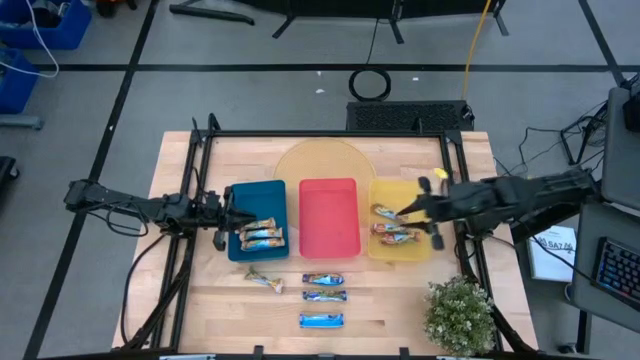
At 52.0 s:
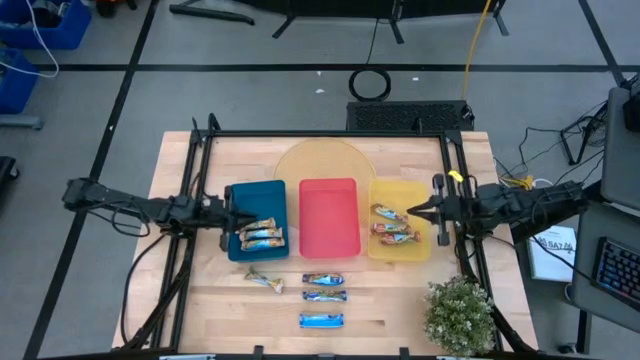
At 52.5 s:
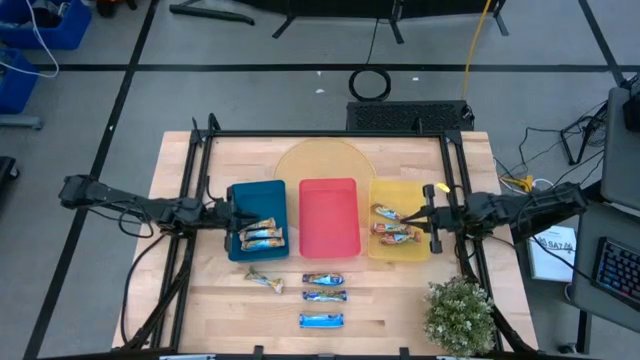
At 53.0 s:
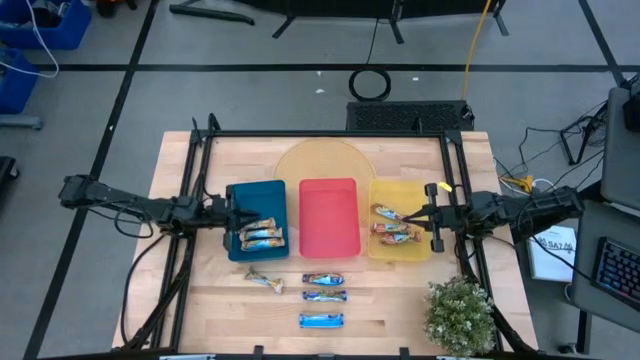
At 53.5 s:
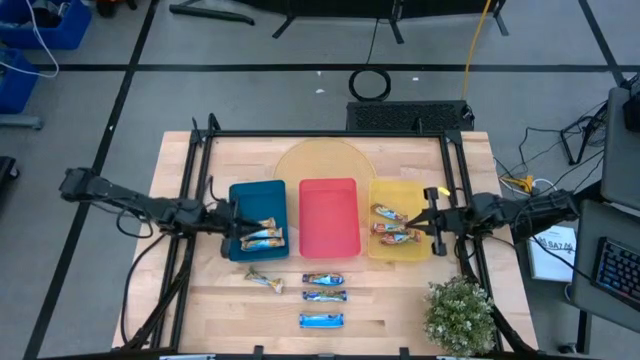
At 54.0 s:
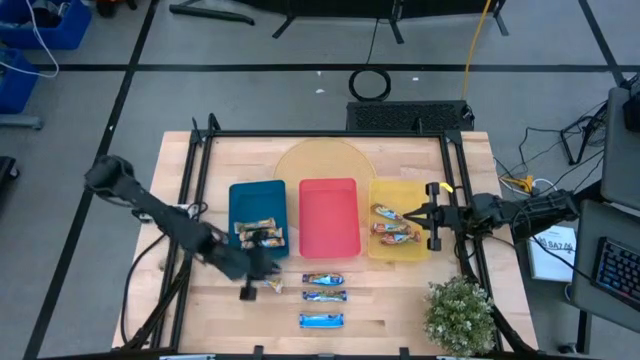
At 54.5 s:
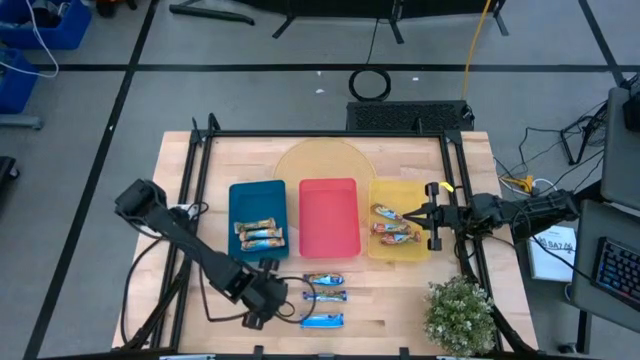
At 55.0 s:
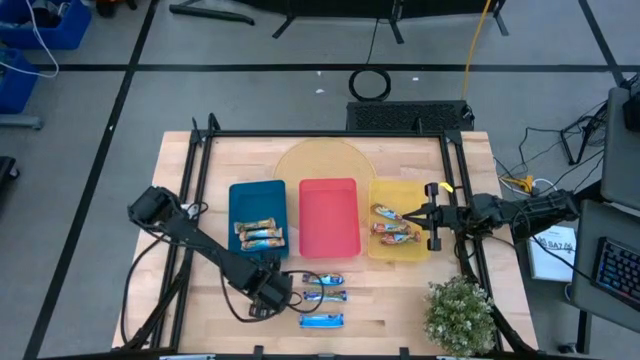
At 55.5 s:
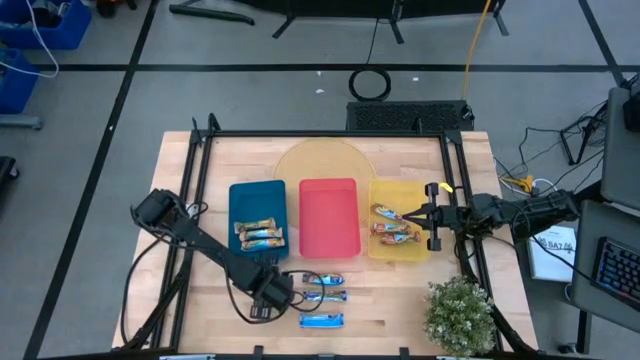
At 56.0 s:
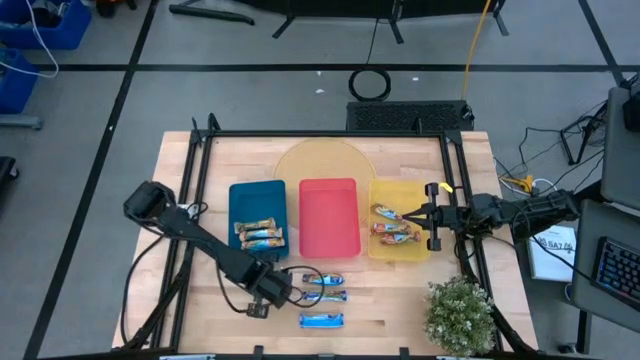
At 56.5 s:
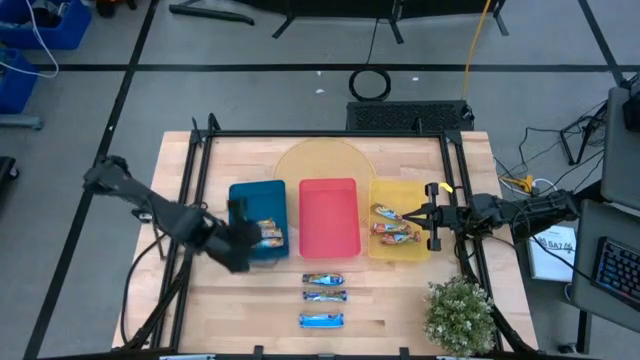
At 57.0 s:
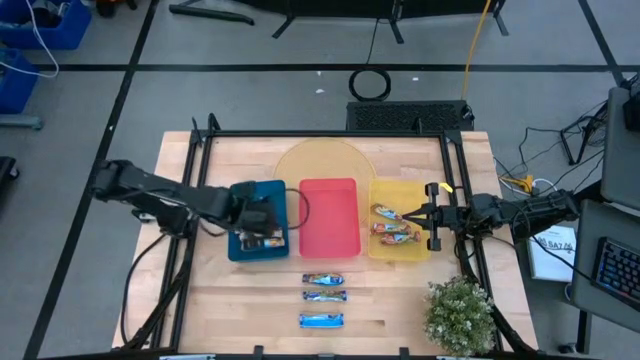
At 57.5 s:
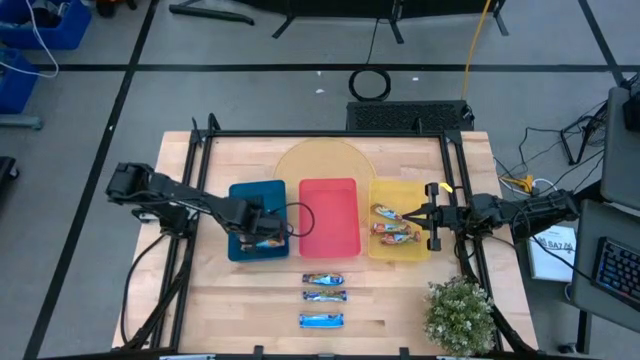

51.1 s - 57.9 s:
Task: Pick and place Granola Bars by type
Put the green granola bar into the blue bin

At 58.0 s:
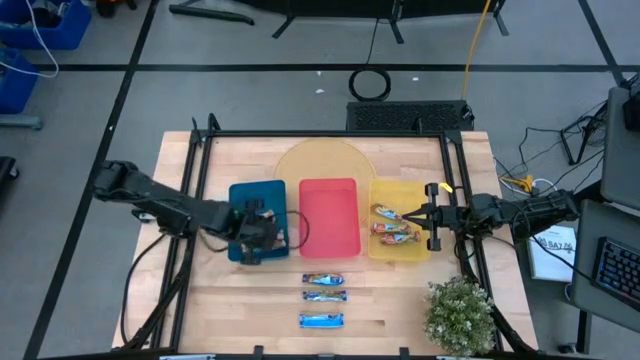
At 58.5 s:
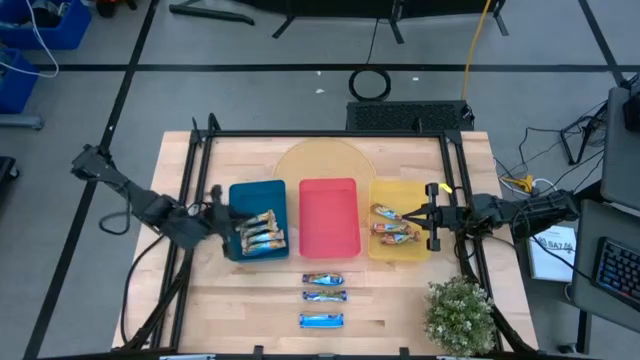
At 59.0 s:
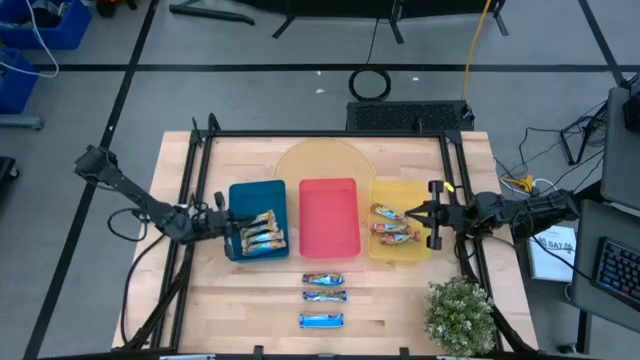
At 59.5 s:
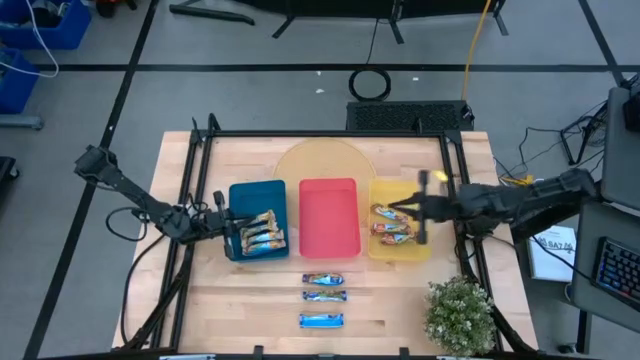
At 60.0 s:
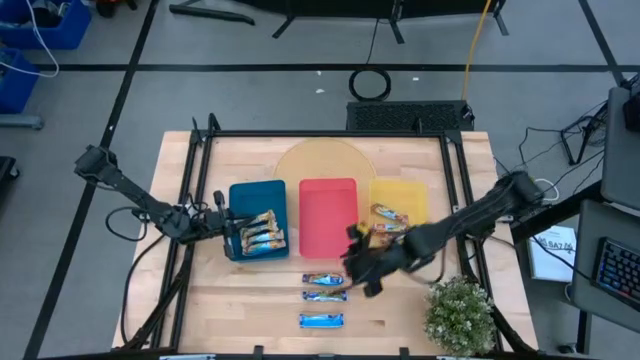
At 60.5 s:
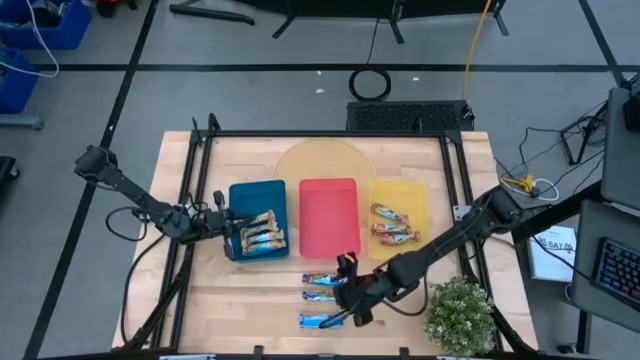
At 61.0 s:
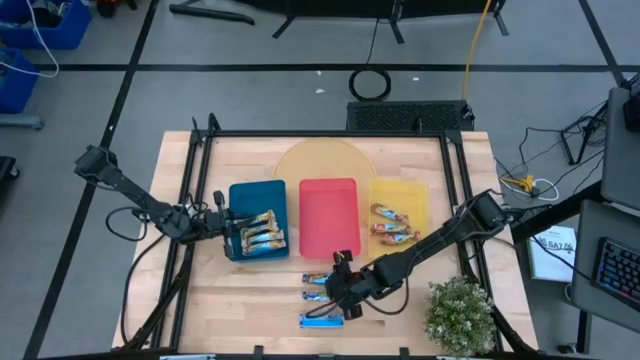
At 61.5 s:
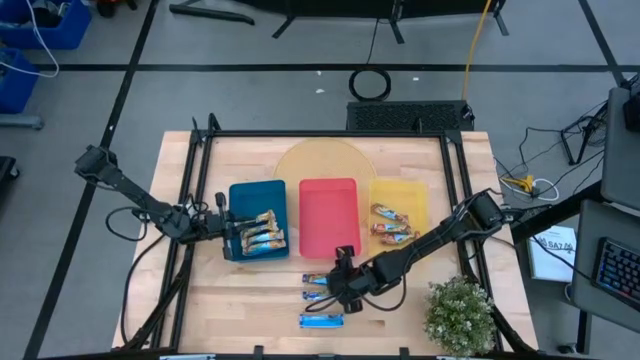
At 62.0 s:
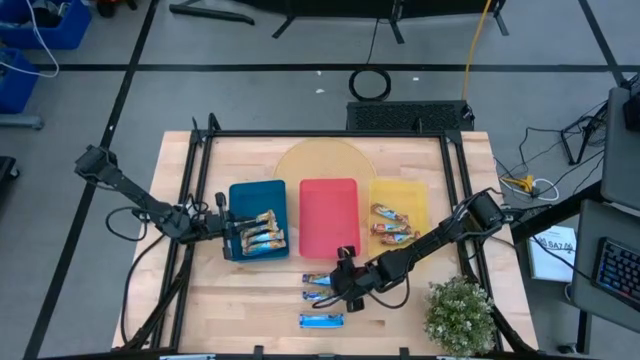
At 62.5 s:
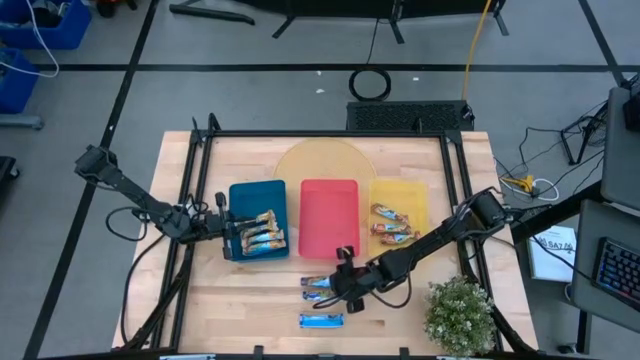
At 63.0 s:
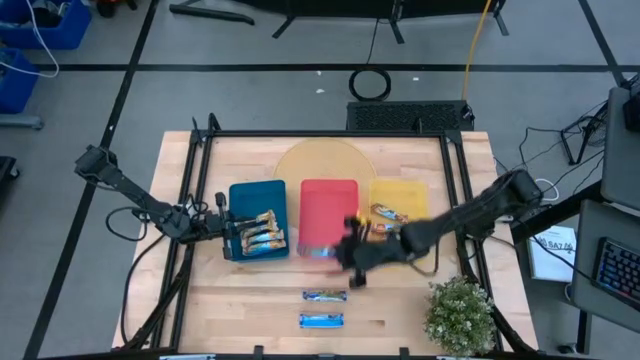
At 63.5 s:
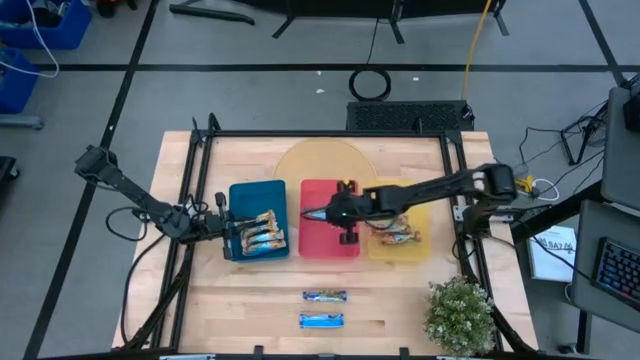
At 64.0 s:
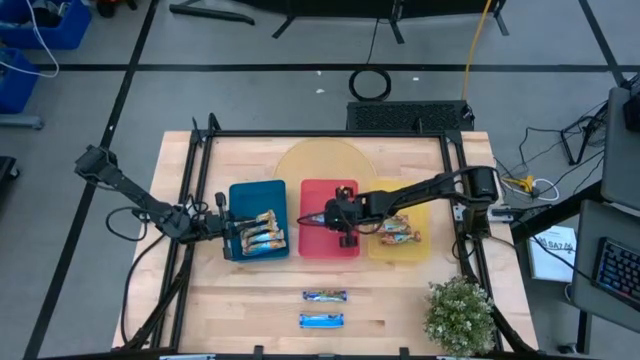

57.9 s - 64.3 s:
Put the top blue granola bar into the red bin

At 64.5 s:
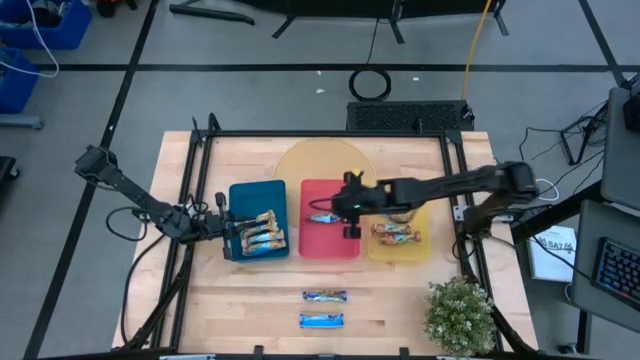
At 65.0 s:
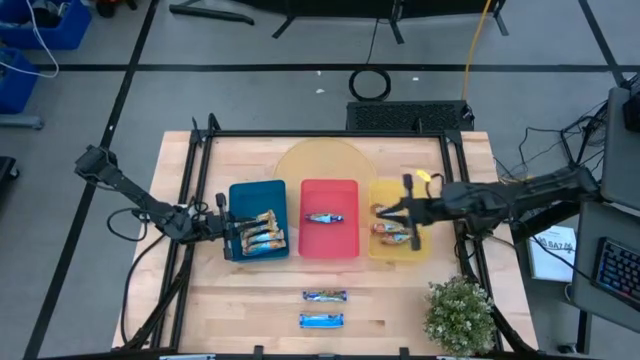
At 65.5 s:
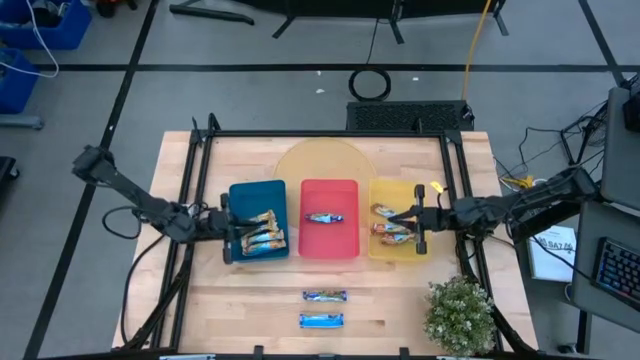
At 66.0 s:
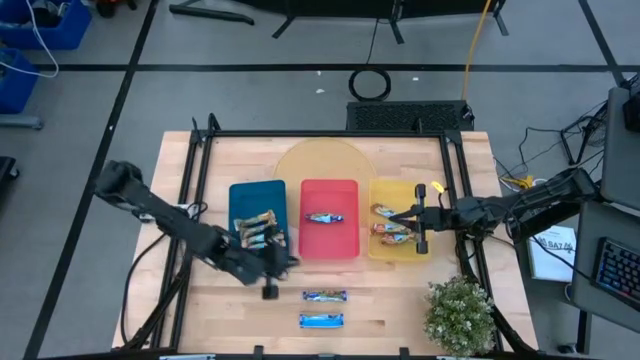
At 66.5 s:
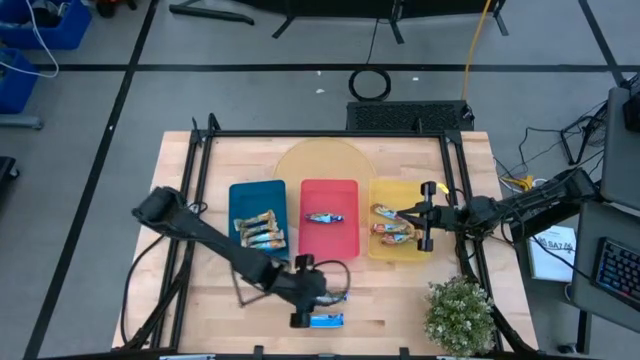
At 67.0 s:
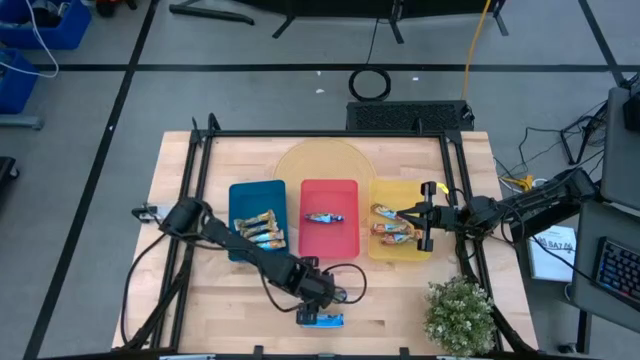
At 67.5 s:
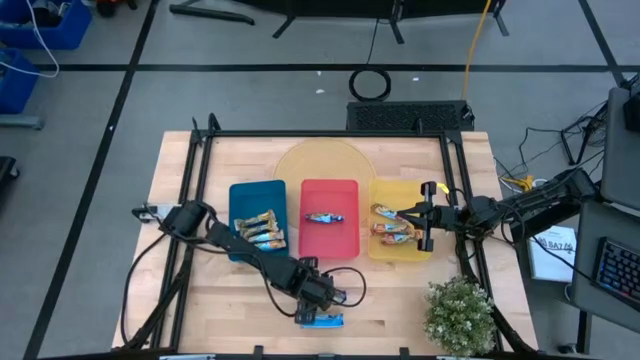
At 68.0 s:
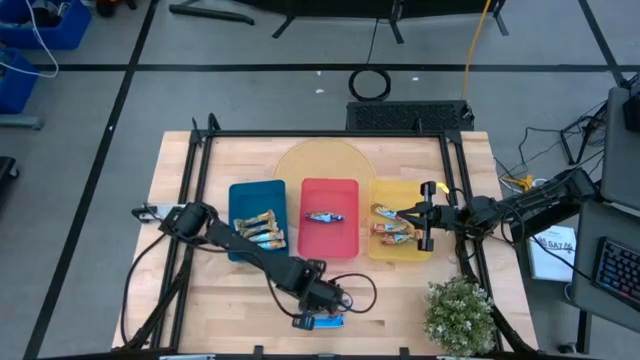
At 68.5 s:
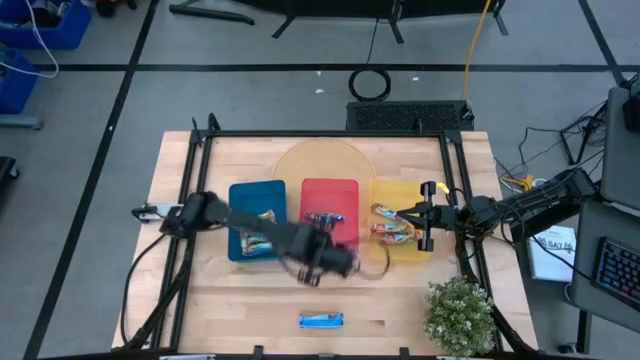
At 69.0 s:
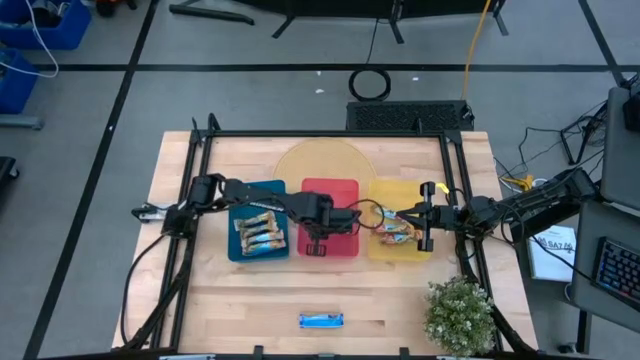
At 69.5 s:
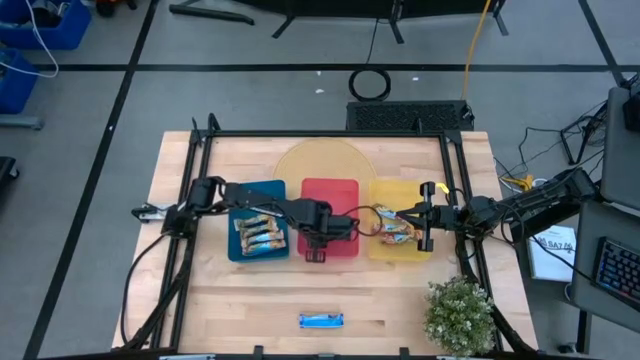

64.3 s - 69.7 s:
Put the top blue granola bar into the red bin

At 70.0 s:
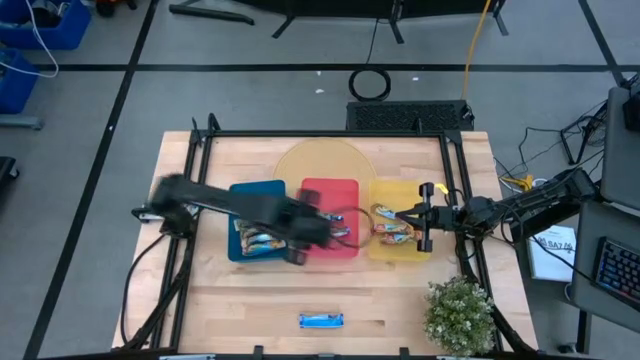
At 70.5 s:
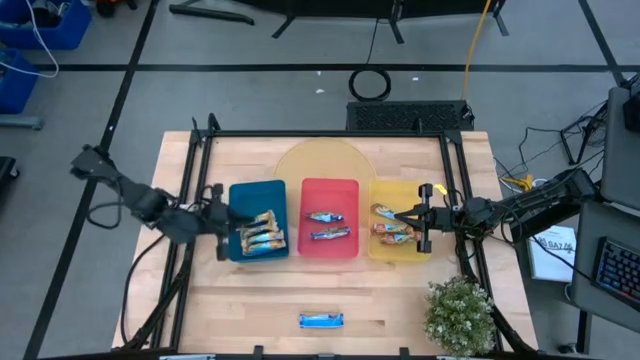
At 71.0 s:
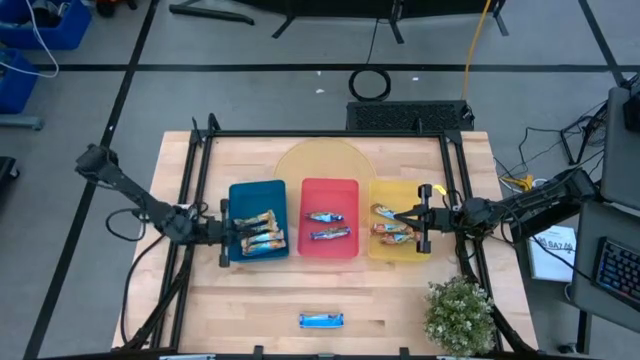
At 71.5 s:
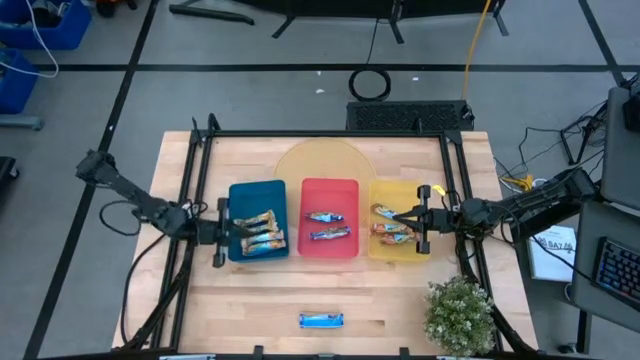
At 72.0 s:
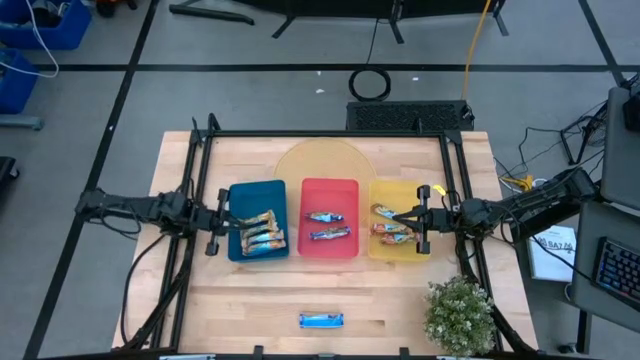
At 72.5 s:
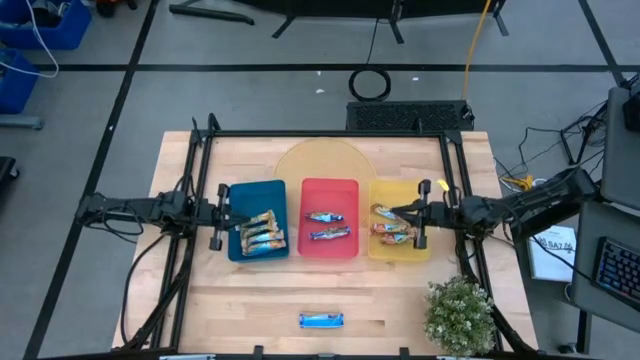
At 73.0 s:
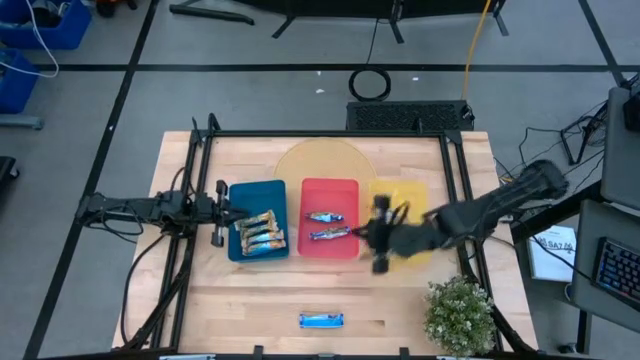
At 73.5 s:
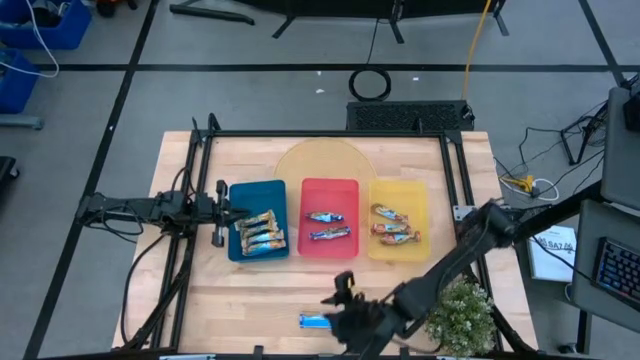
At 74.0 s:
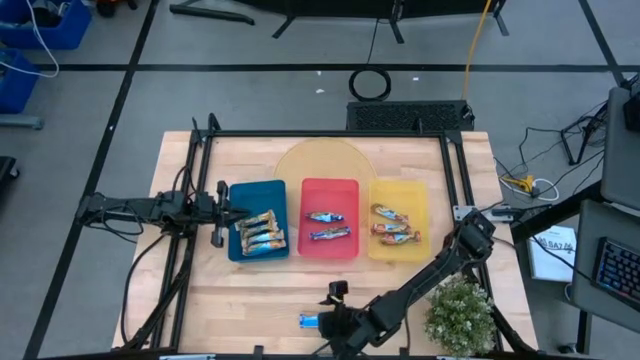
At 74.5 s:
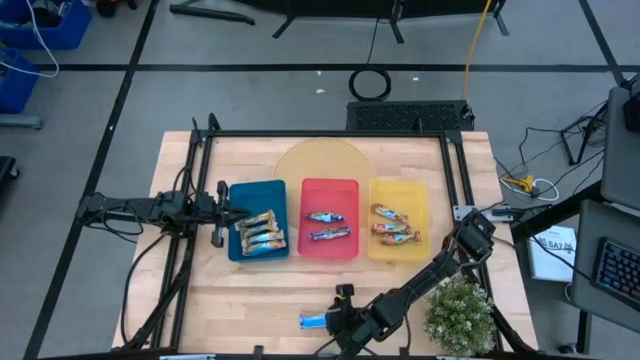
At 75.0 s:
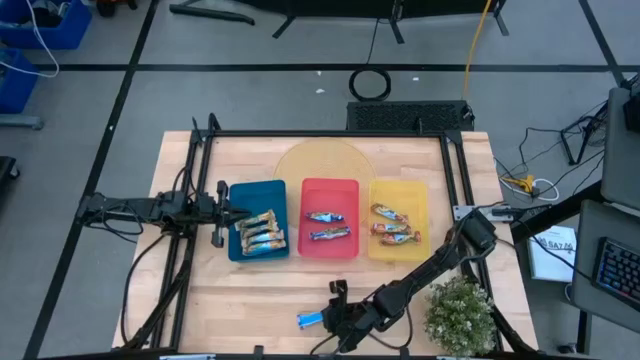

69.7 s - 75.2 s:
Put the blue granola bar into the red bin
